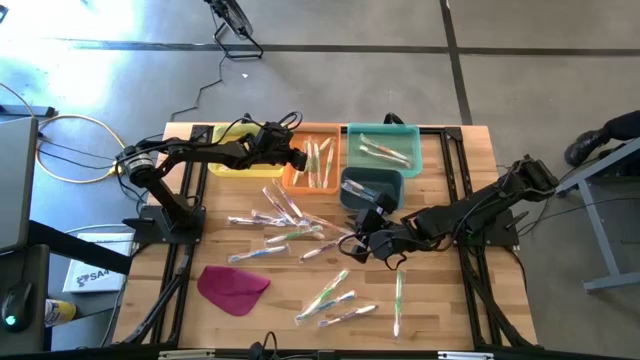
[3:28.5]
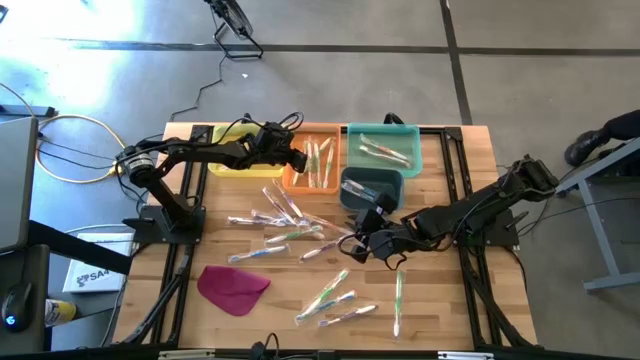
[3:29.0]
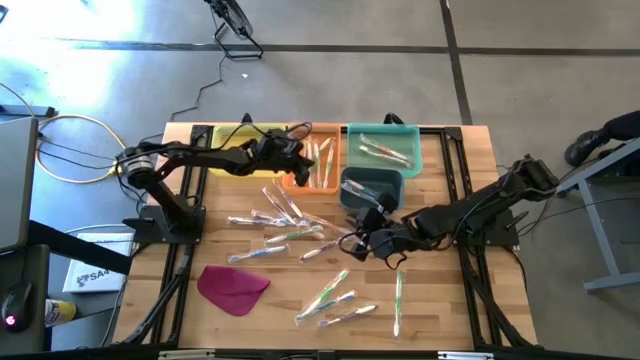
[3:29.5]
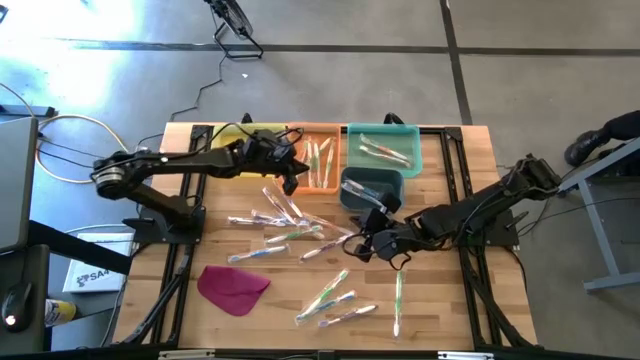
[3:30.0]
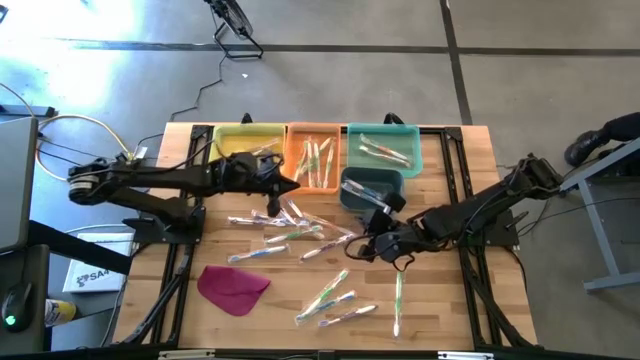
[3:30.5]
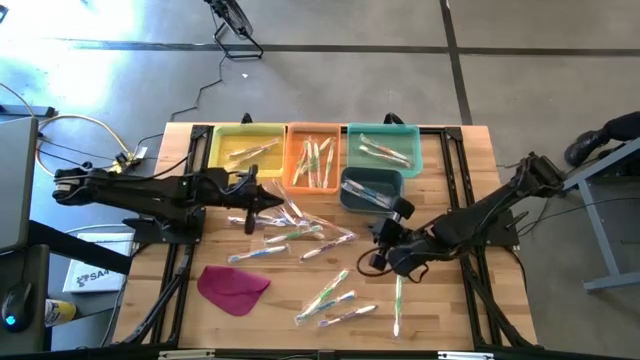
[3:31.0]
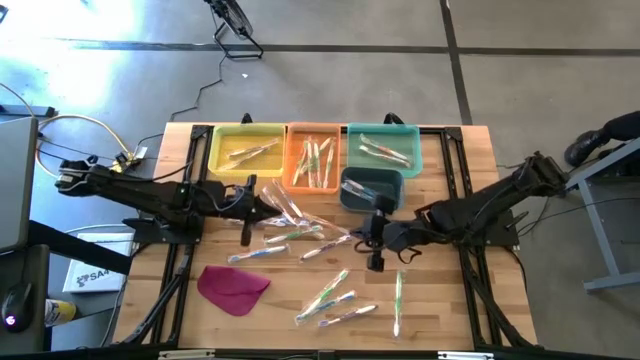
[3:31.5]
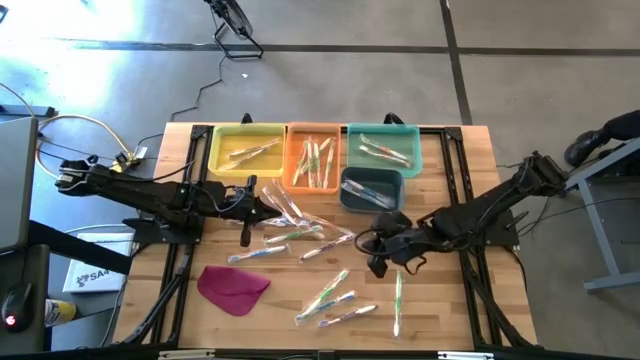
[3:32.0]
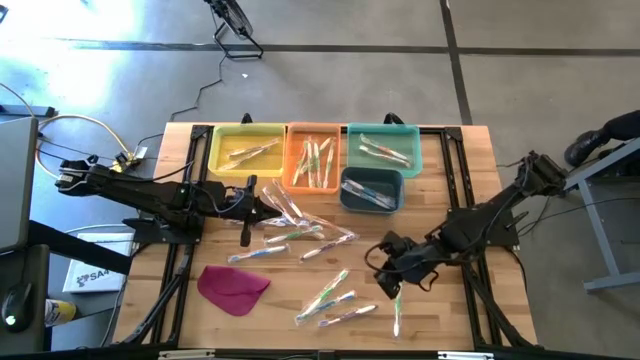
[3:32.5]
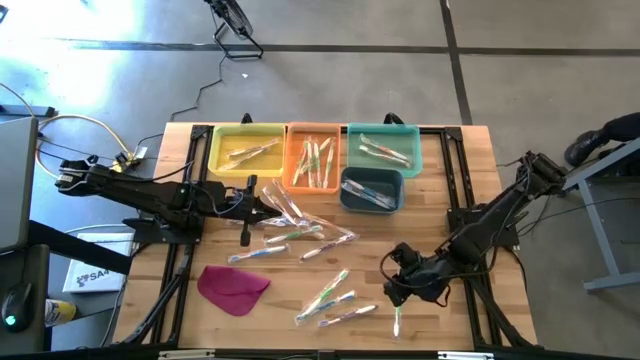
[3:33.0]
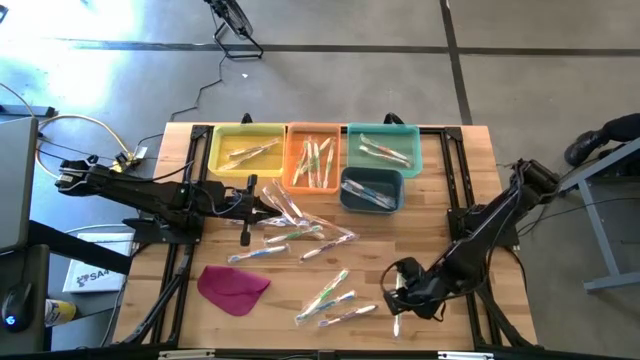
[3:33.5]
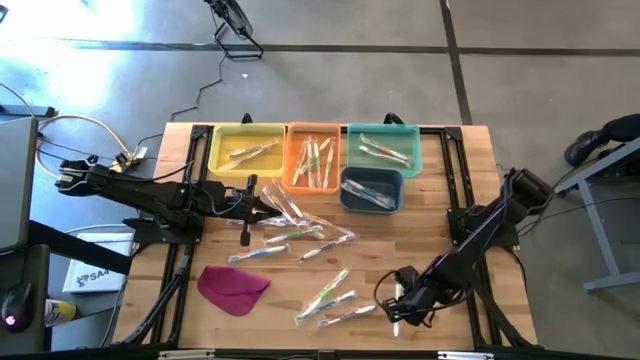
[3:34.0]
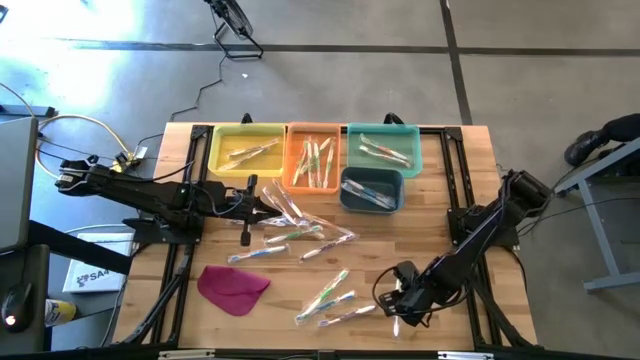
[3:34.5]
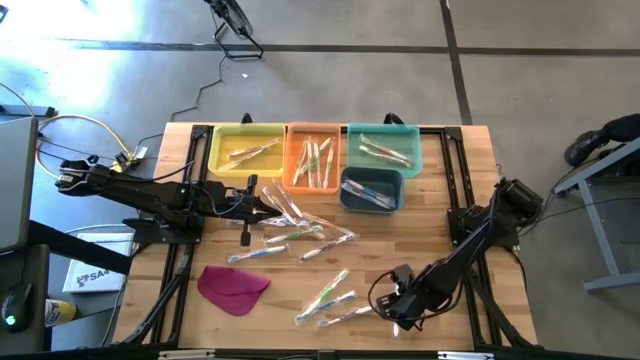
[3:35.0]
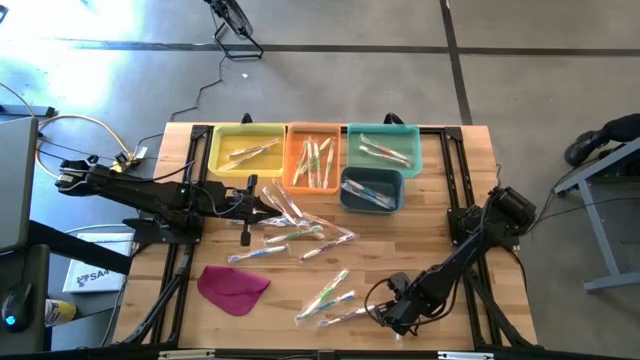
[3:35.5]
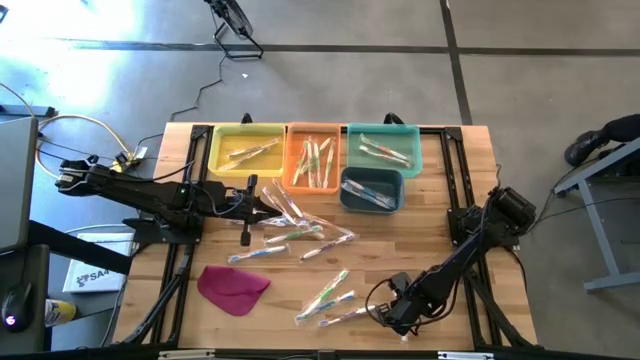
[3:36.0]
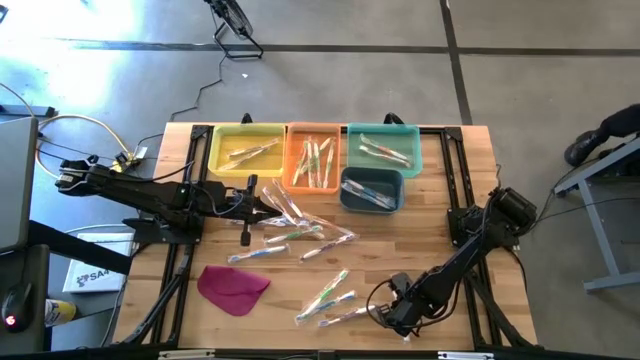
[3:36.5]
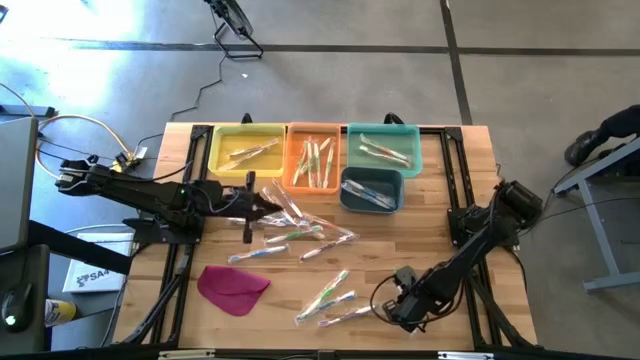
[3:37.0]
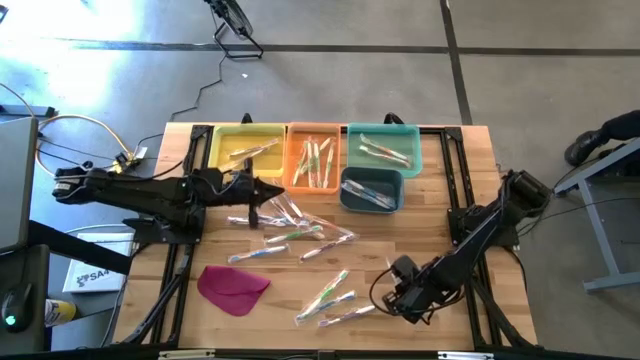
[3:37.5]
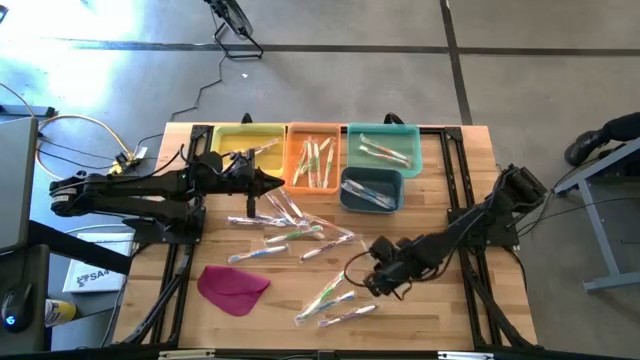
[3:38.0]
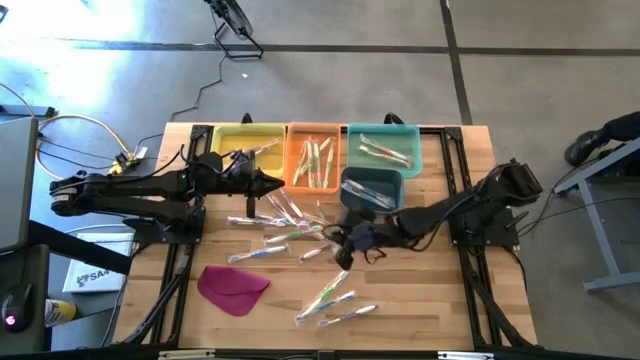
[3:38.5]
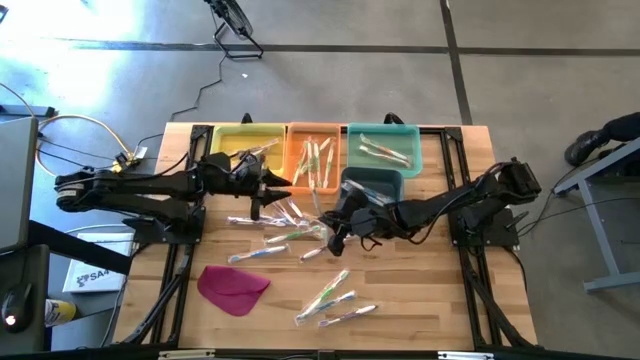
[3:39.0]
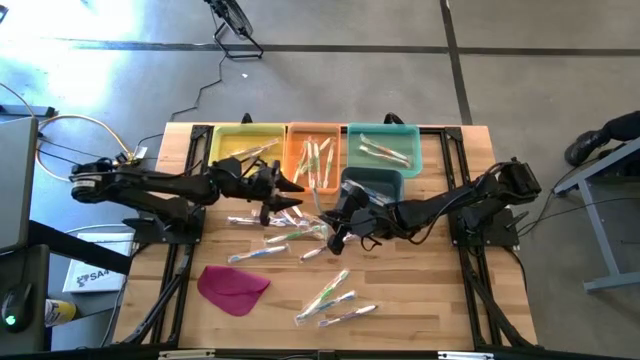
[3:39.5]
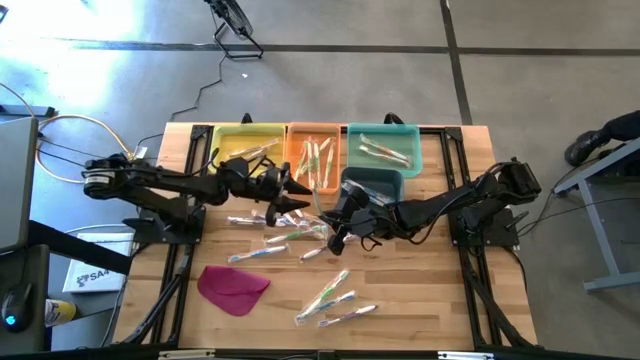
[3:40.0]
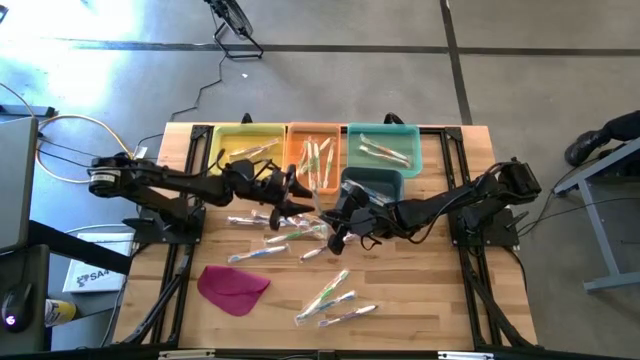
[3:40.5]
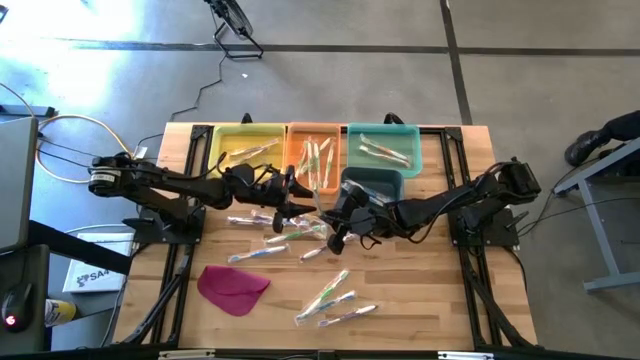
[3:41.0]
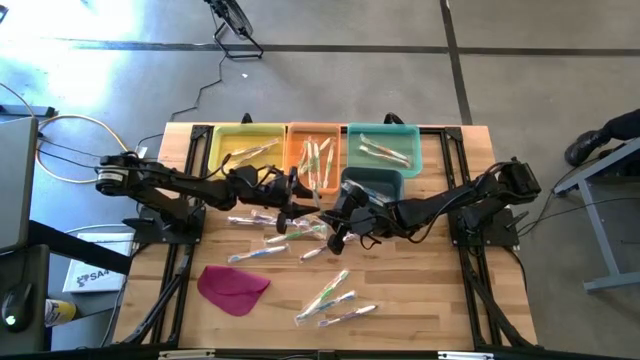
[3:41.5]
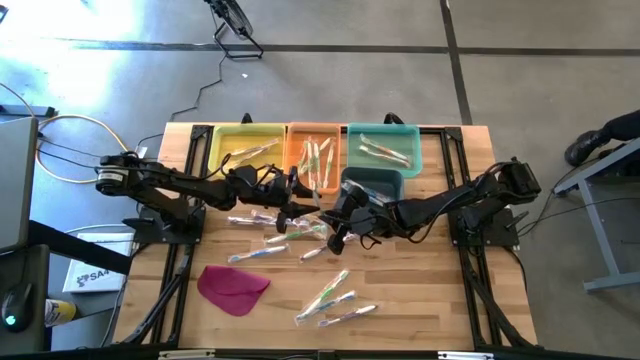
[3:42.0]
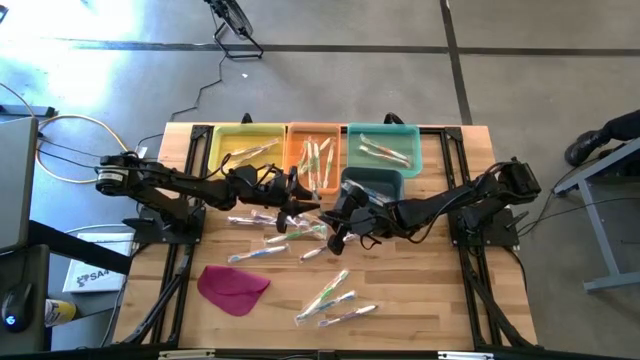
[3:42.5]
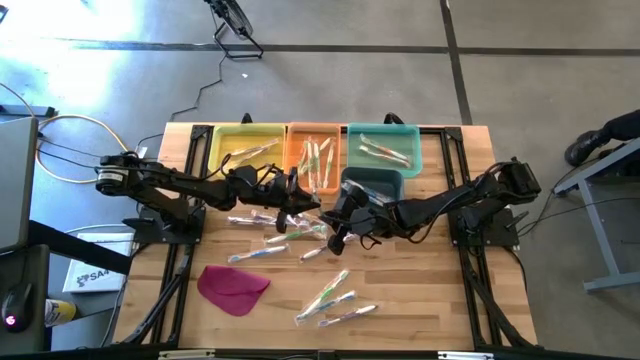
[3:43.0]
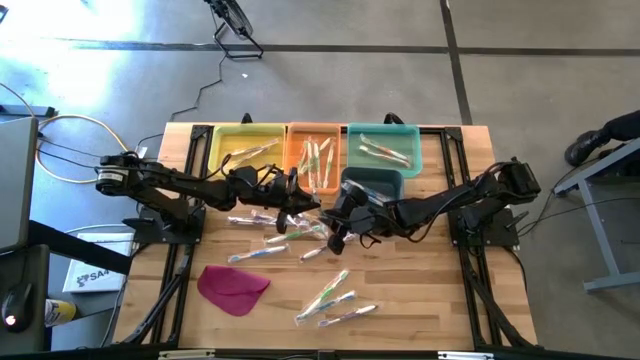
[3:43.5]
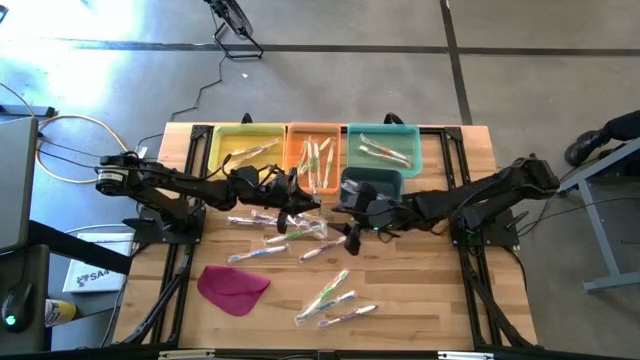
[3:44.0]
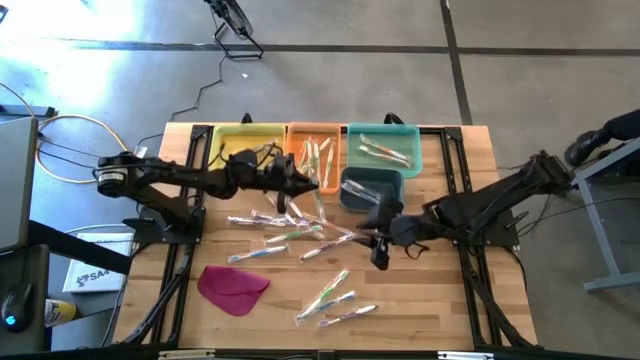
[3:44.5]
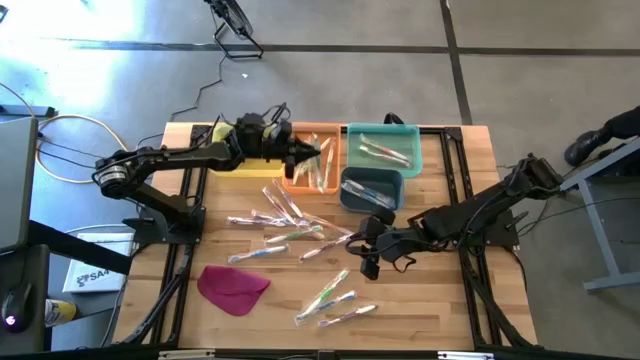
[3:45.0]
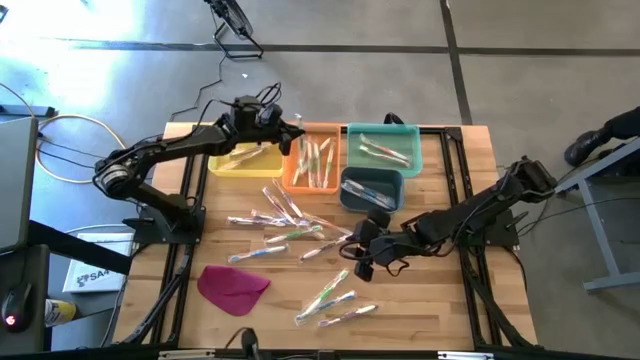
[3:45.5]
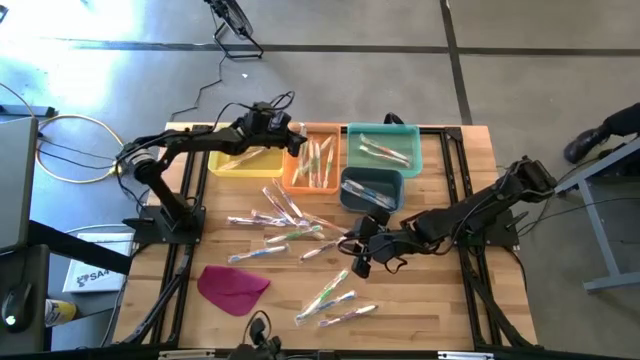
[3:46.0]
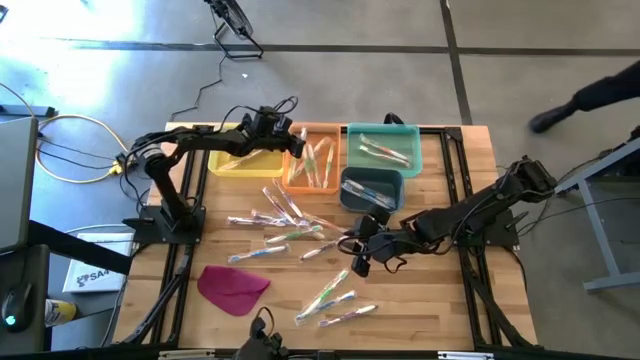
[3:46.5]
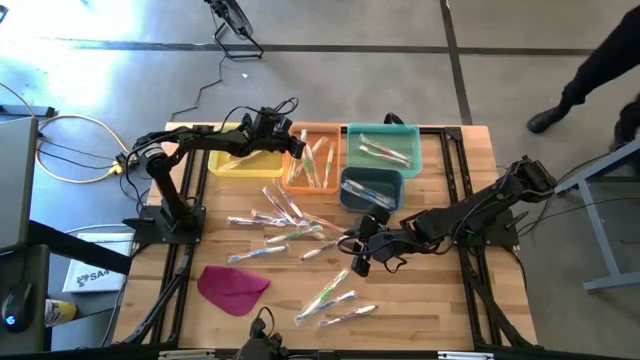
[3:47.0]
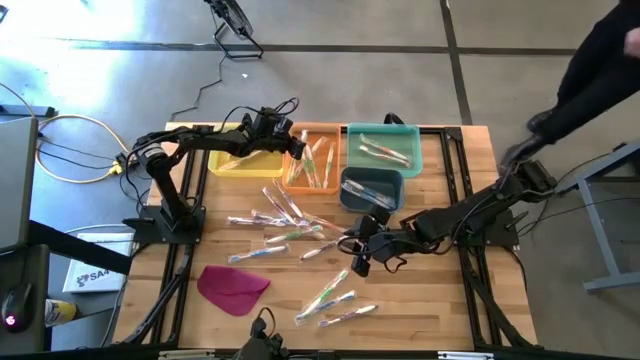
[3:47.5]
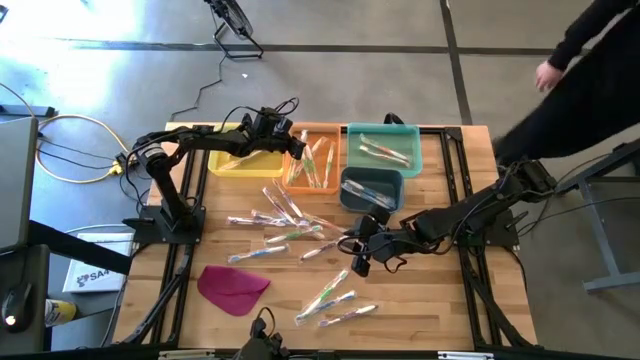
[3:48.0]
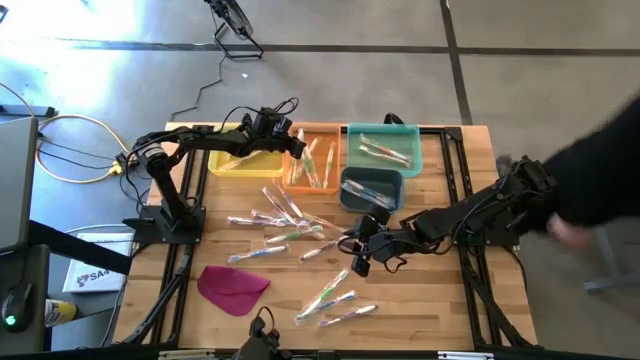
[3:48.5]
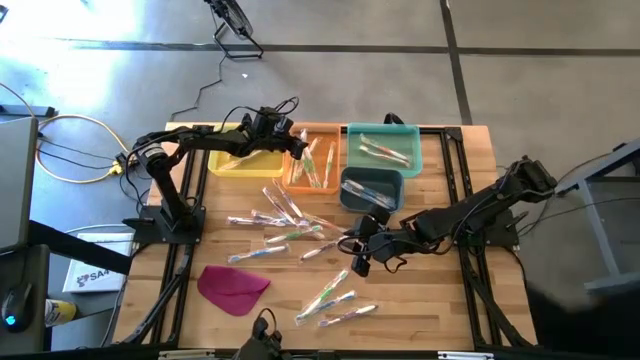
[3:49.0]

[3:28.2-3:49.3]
Task: Pick & Place Toothbrushes
Put the green toothbrush into the orange bin

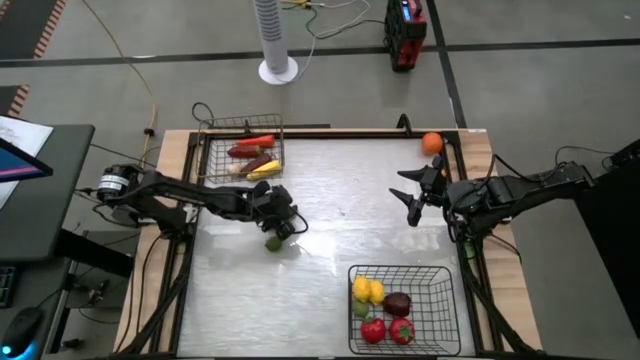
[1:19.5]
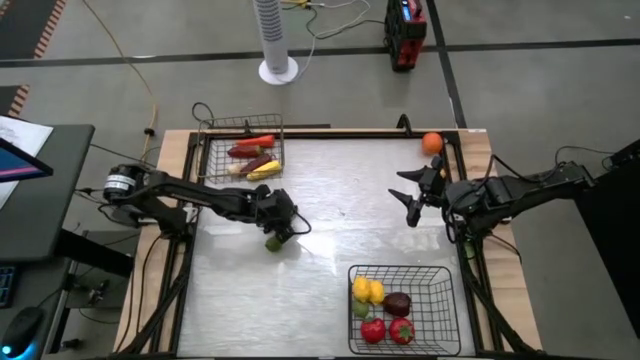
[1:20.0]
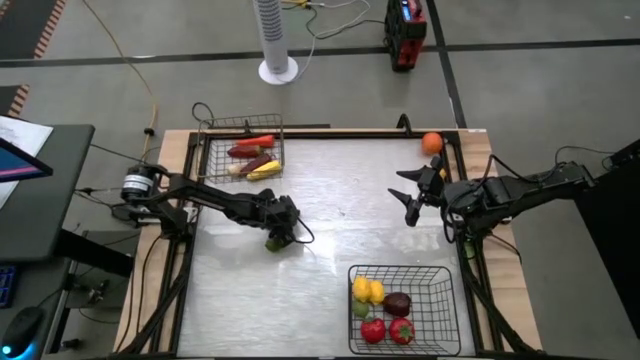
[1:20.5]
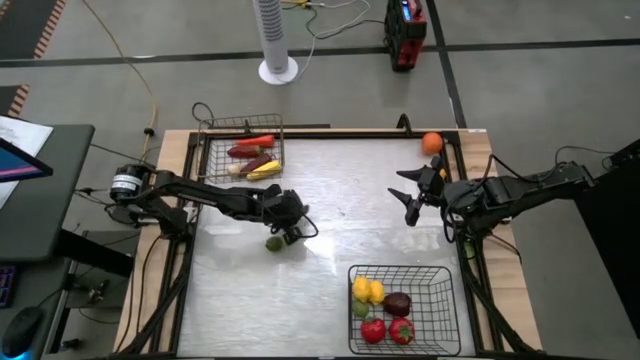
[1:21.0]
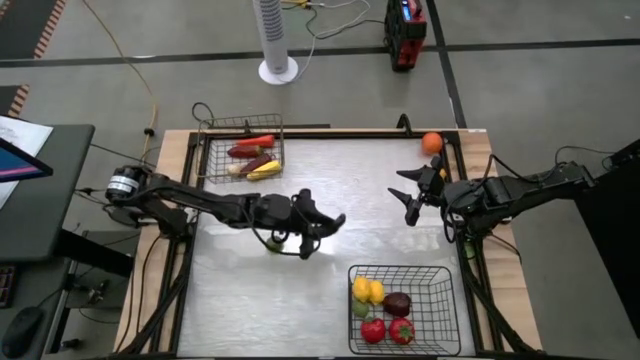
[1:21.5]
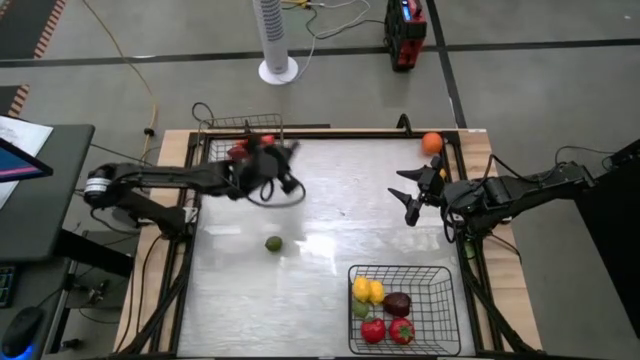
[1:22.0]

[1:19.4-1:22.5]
Task: Sort produce into baskets
Put the green chili pepper into the top wire basket
